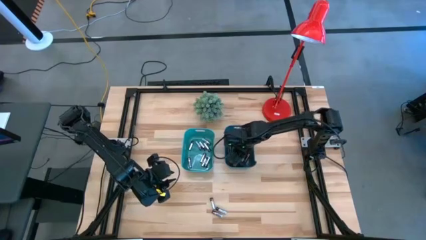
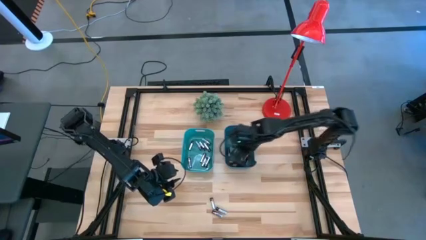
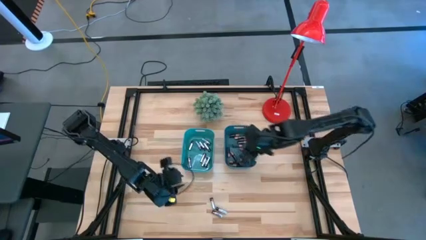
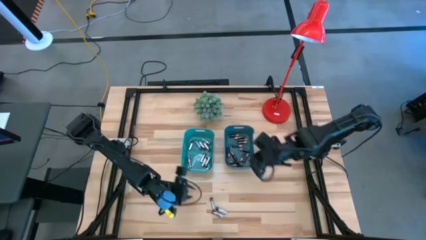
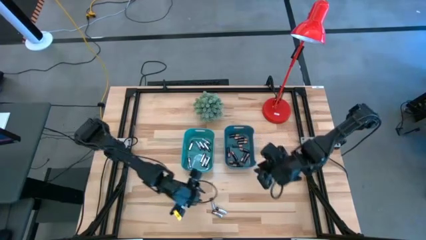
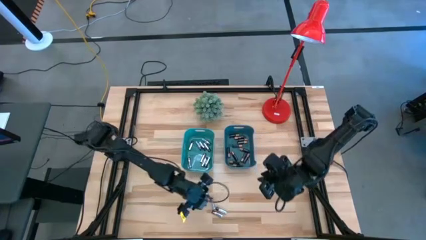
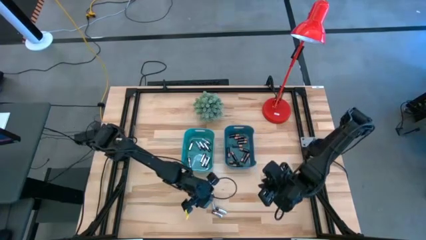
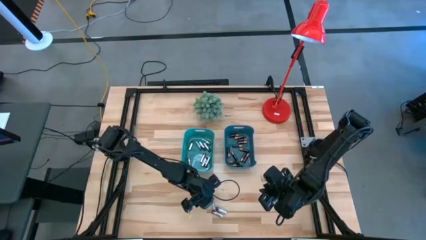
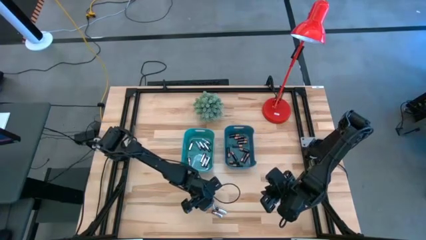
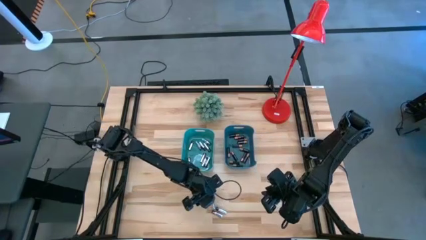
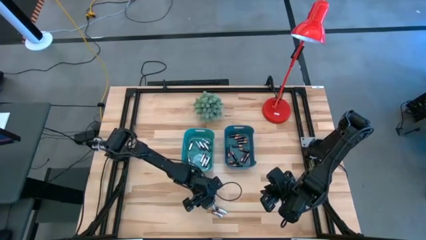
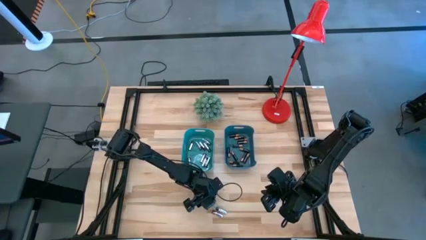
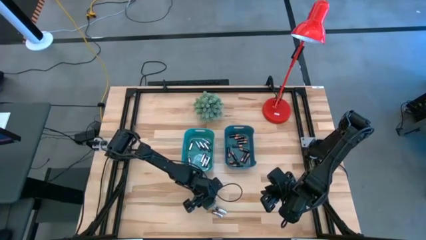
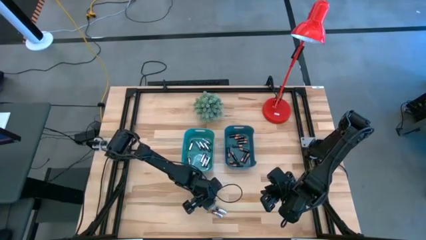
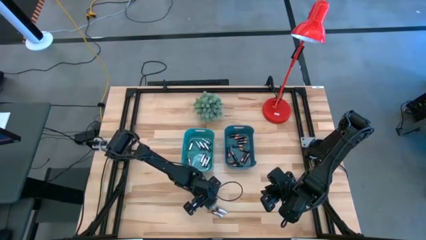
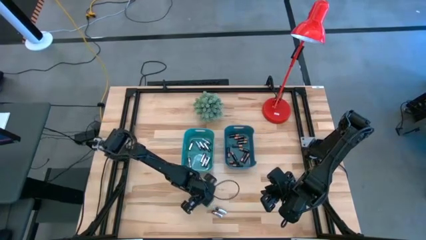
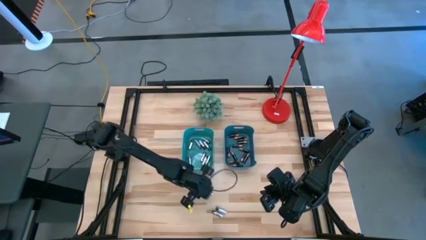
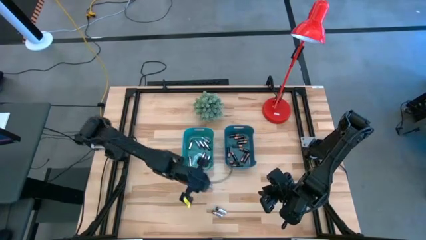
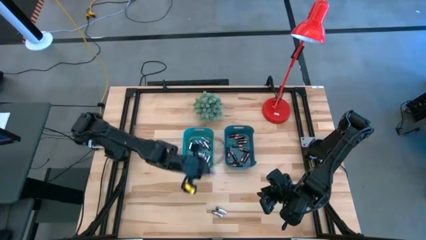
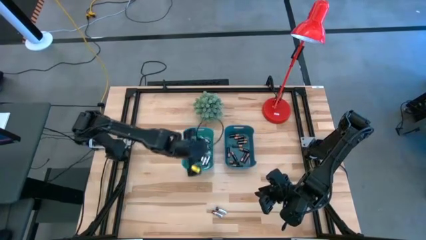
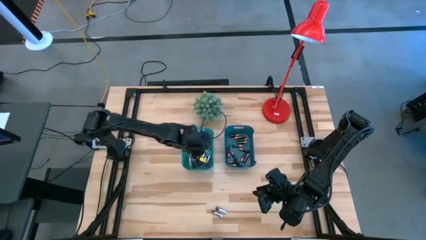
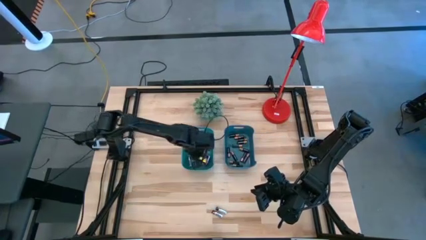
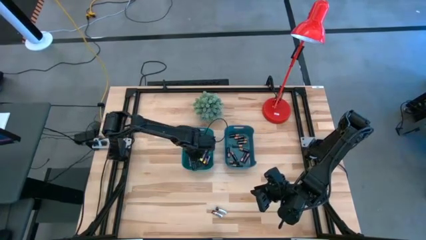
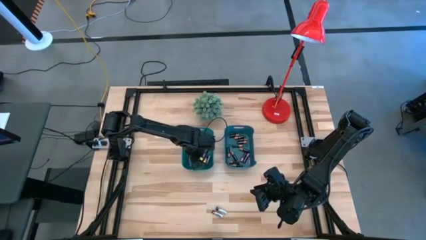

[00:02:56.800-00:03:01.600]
Task: Sort batteries
Put the silver battery into the green bin

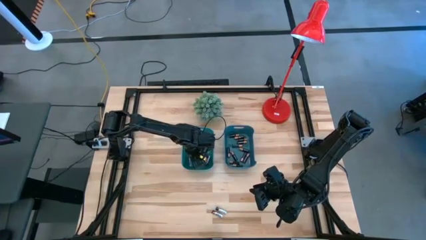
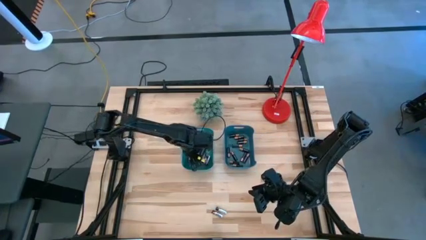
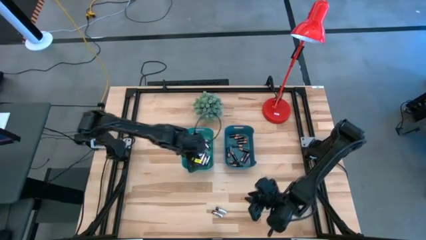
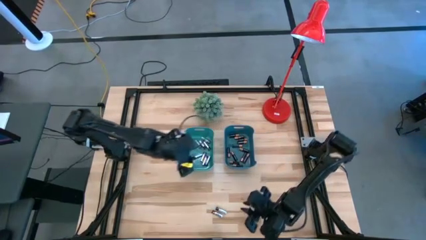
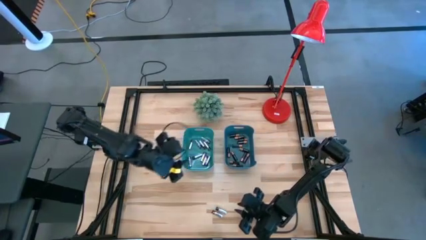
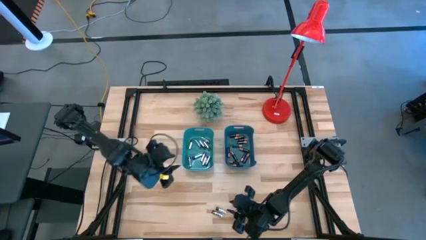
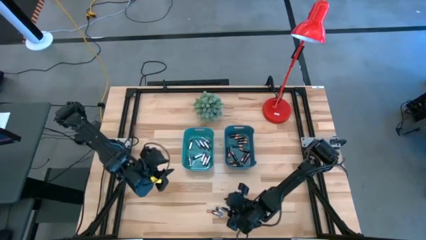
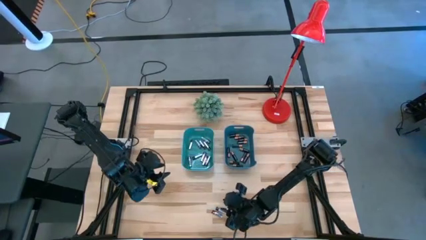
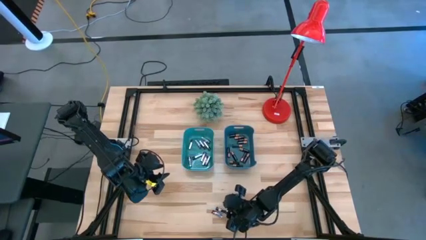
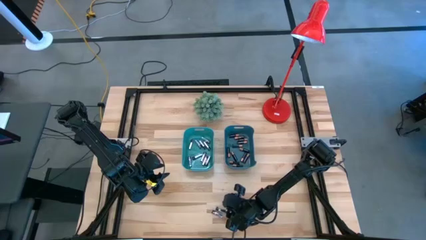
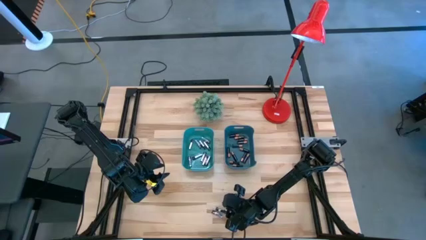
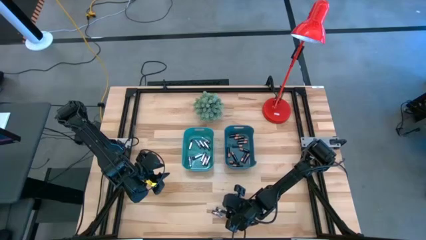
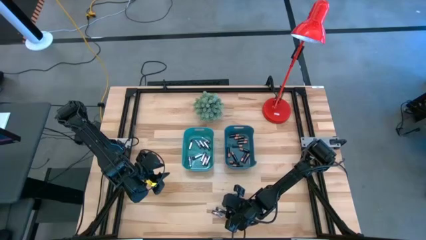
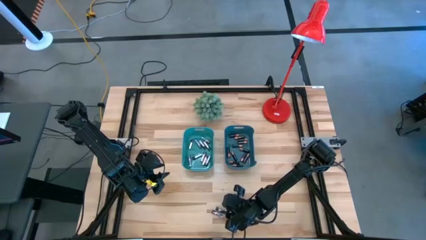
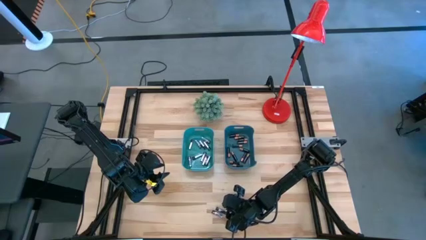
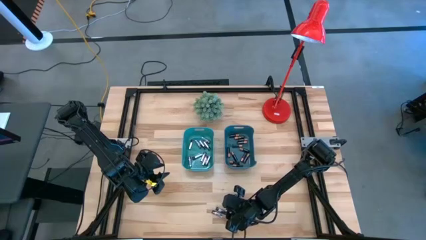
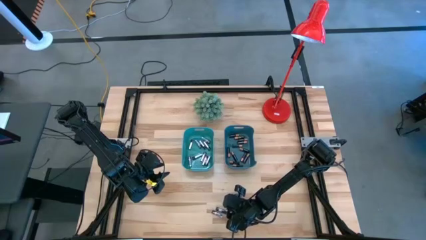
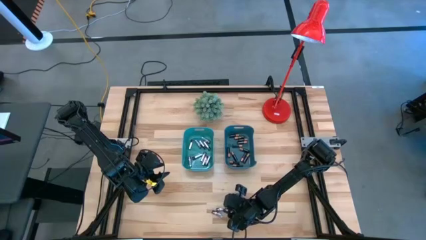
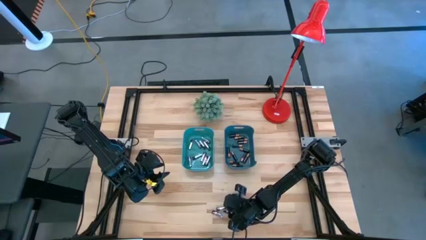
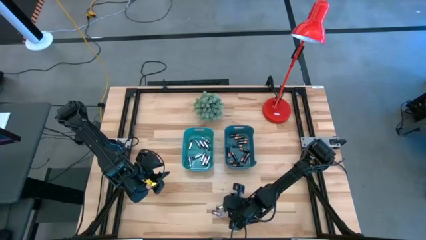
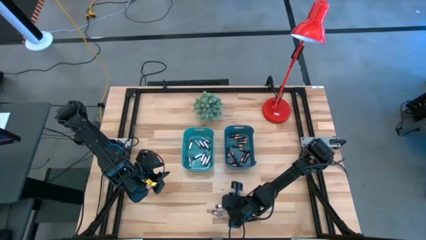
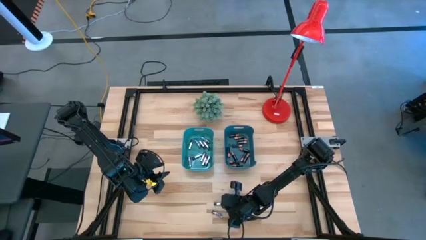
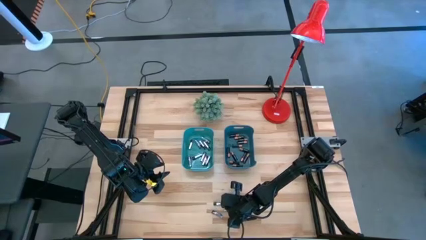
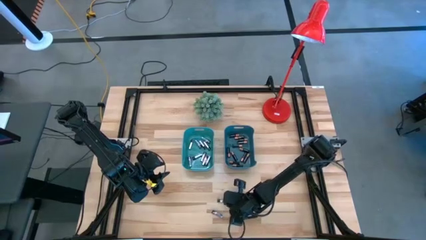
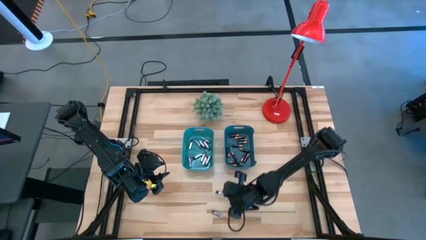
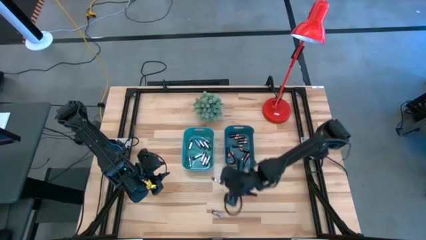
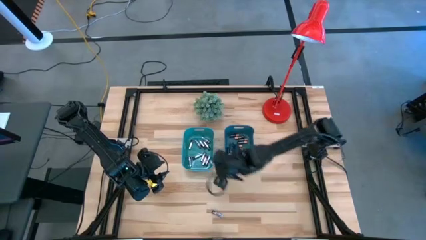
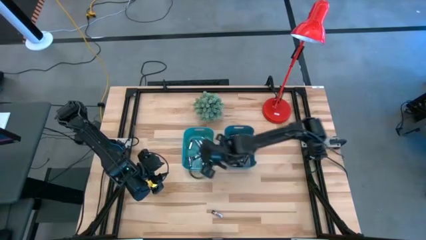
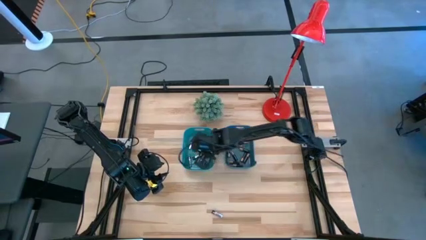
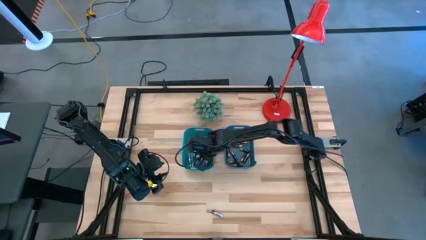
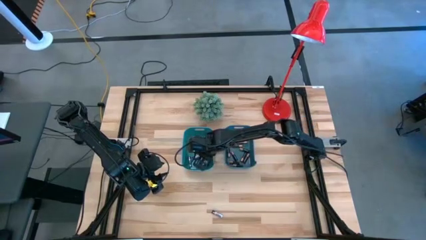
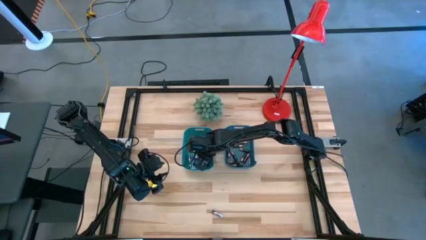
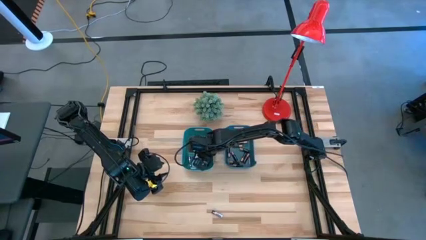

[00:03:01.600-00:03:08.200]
Put the silver battery into the green bin

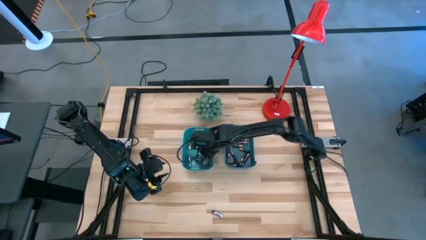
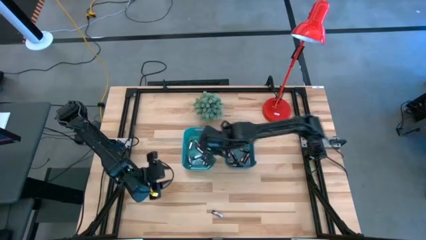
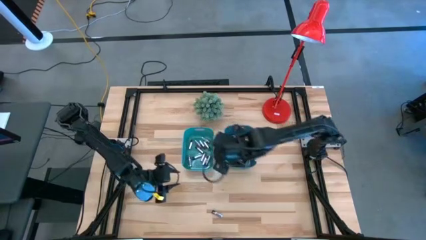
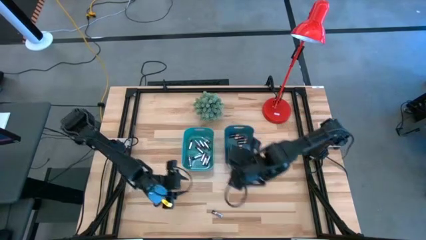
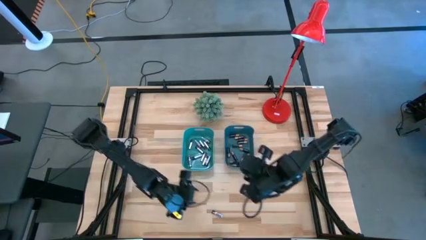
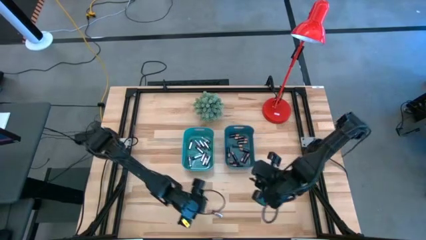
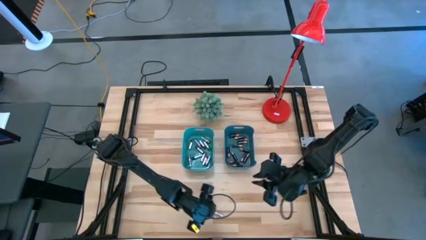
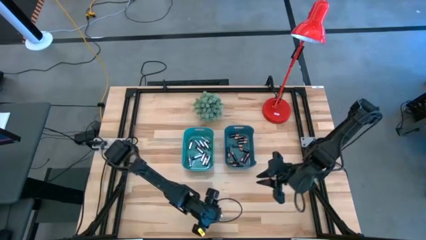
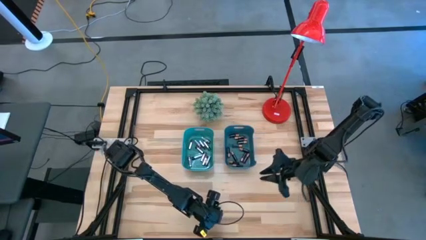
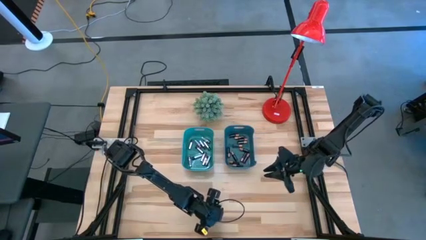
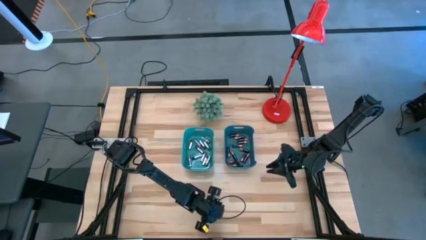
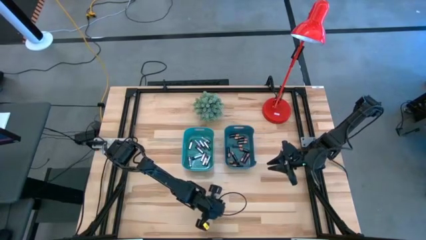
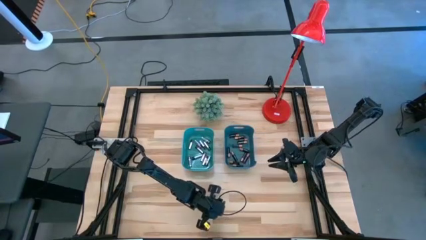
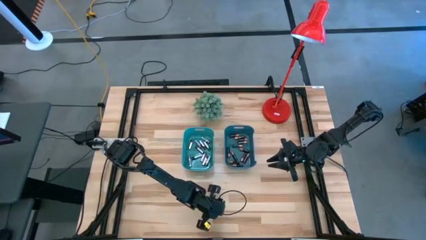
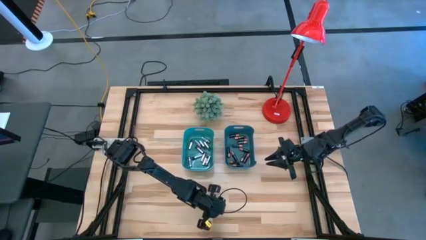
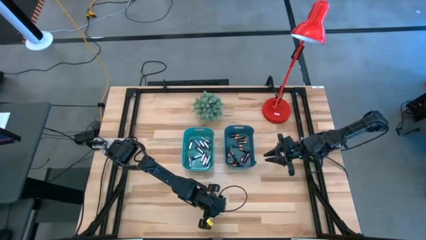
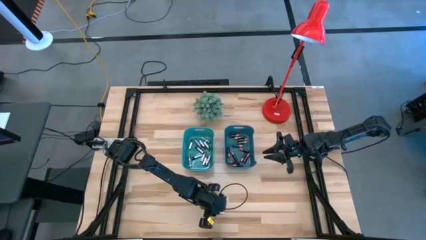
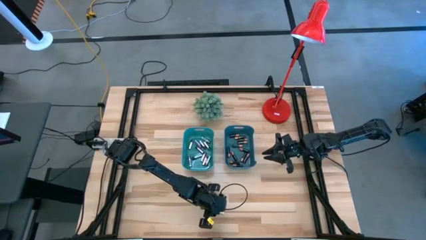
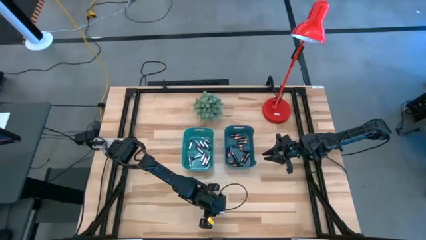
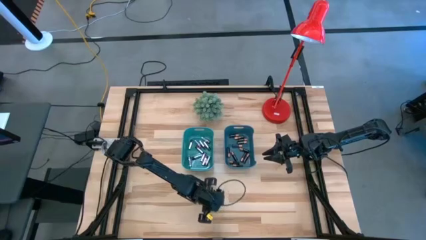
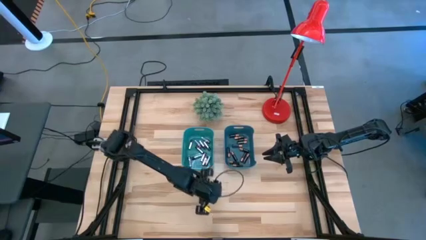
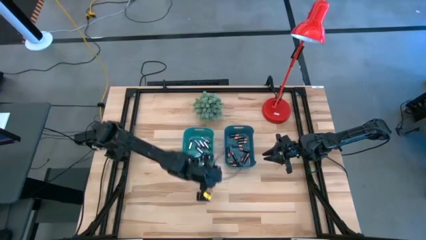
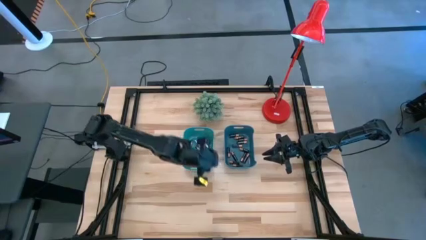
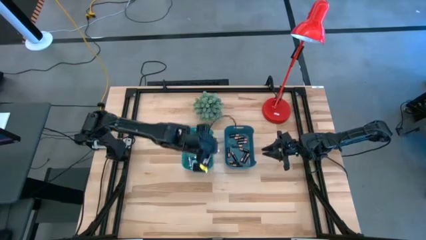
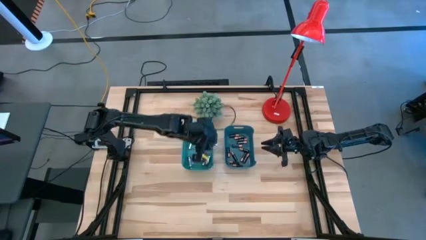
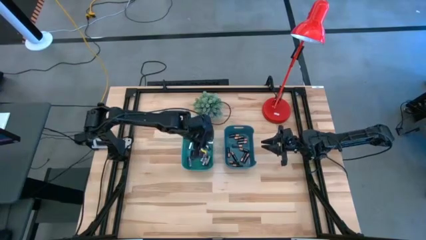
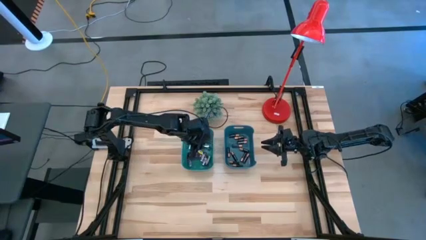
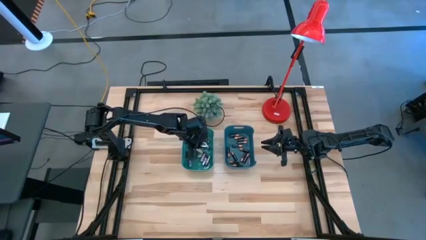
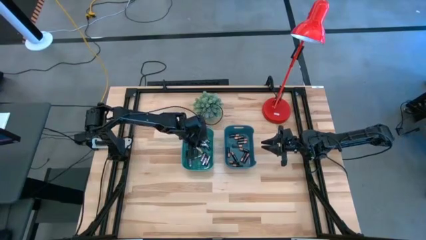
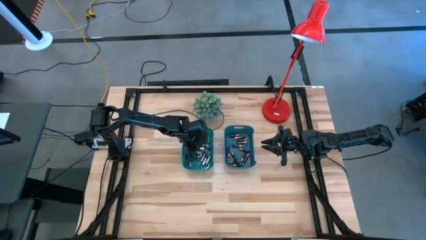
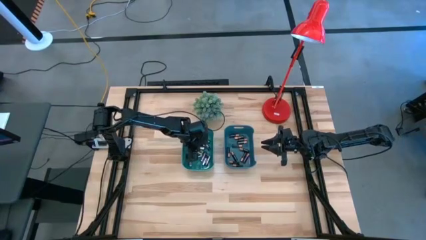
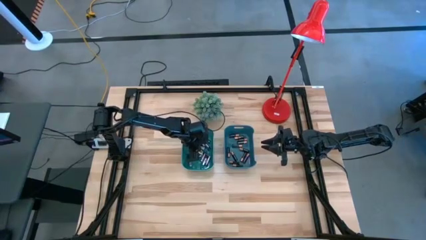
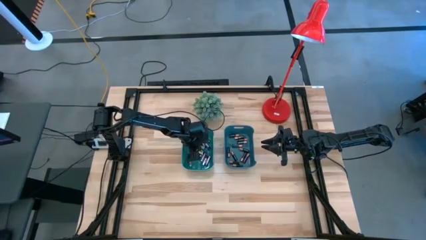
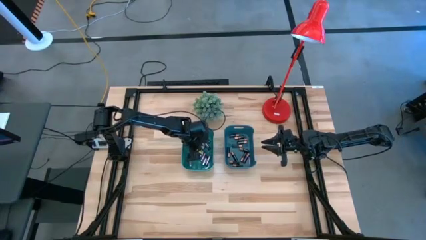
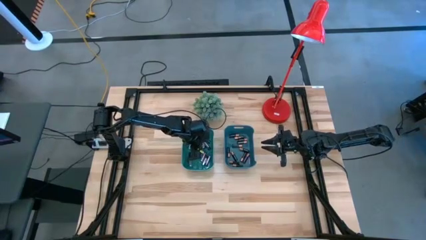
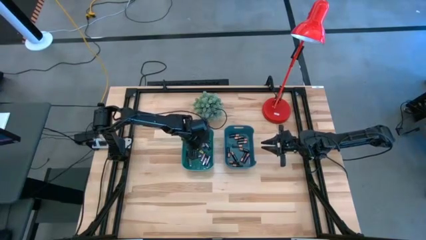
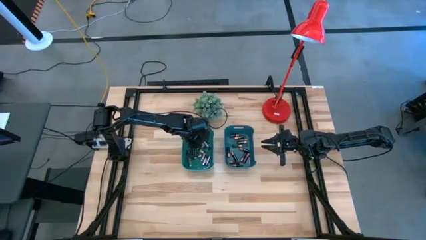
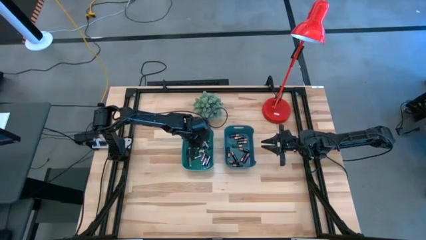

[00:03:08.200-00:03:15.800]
Put the silver battery into the green bin
